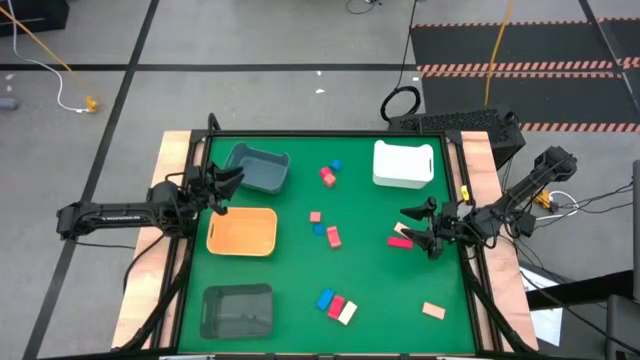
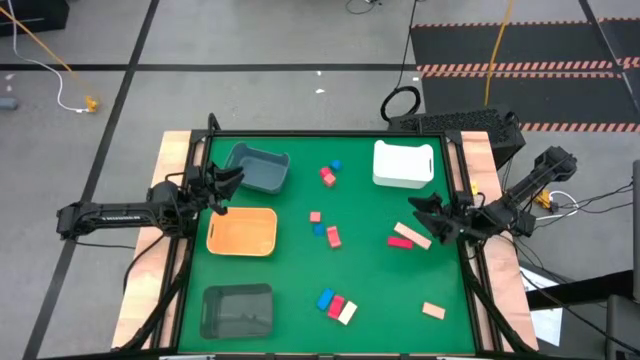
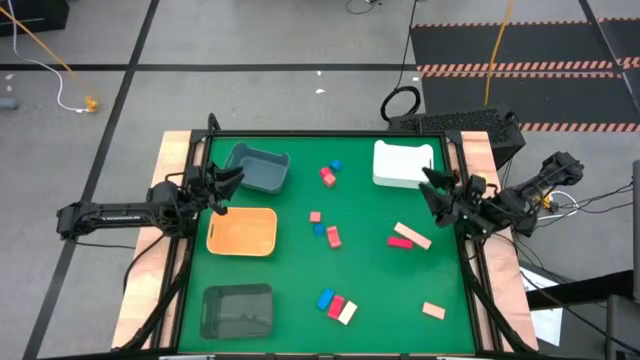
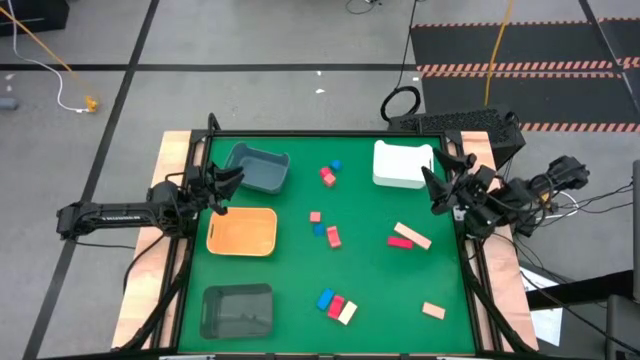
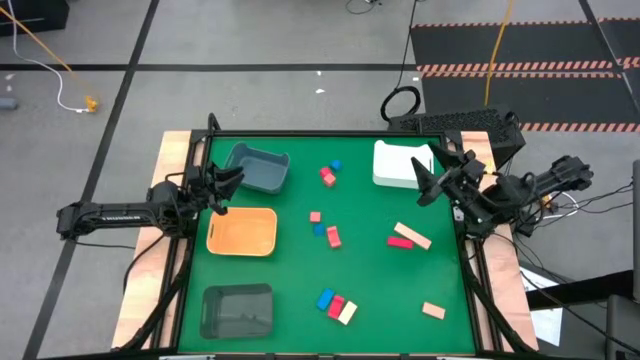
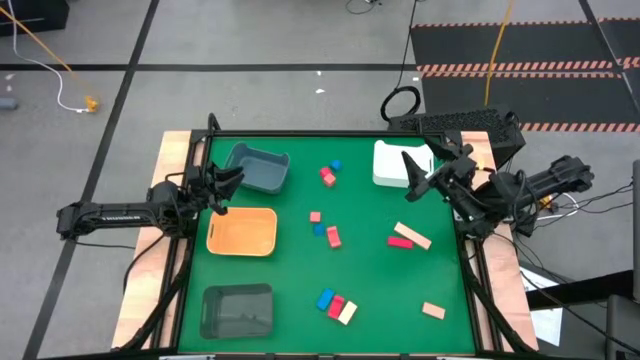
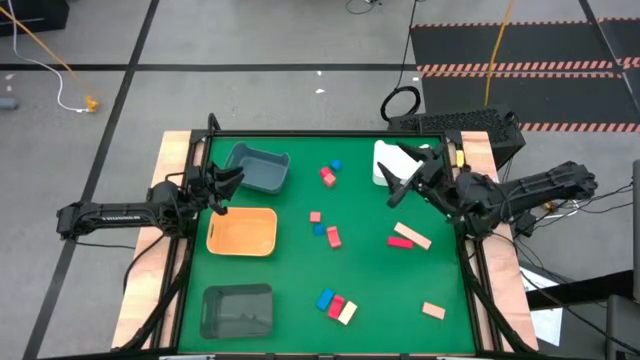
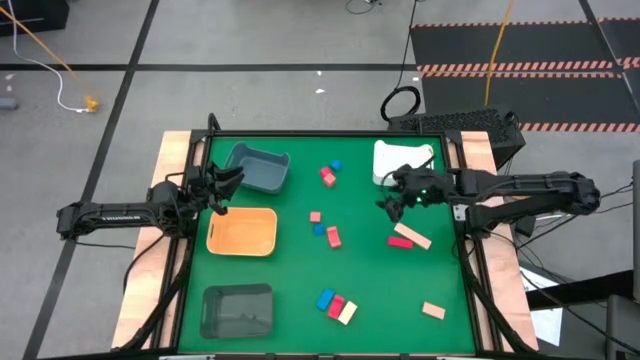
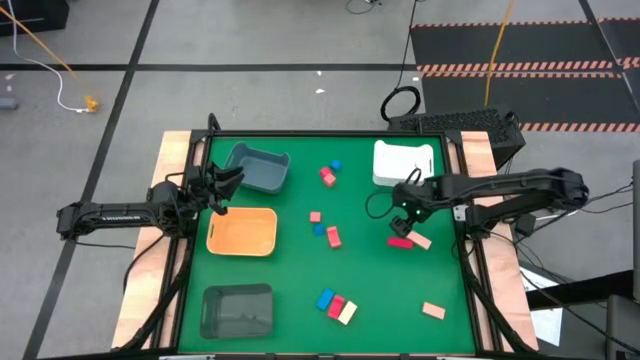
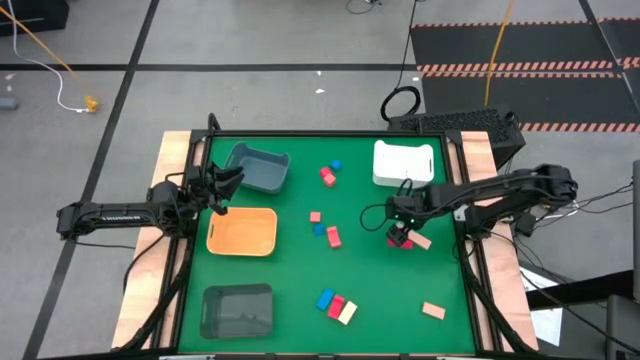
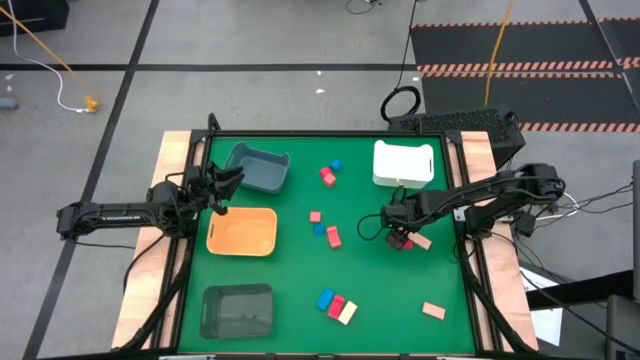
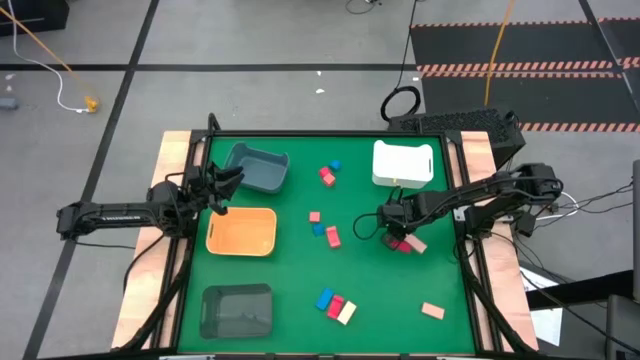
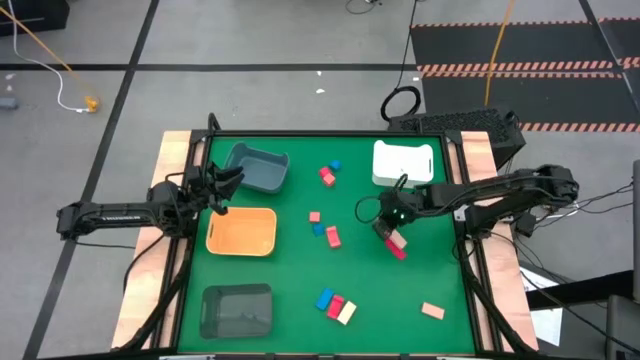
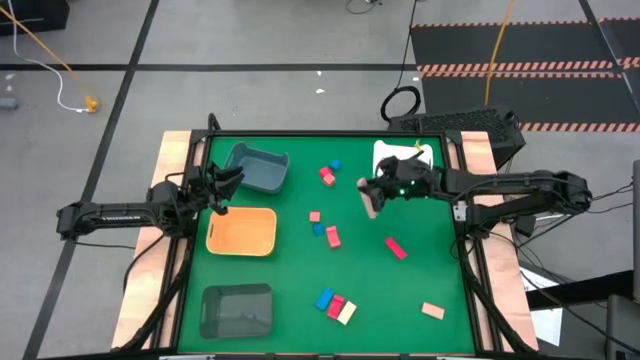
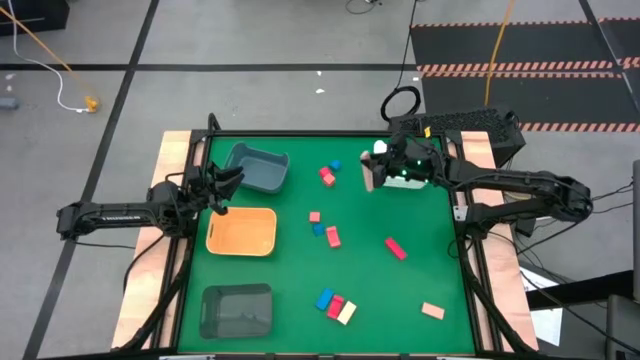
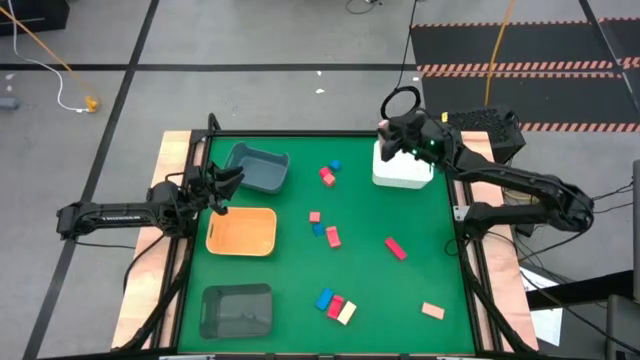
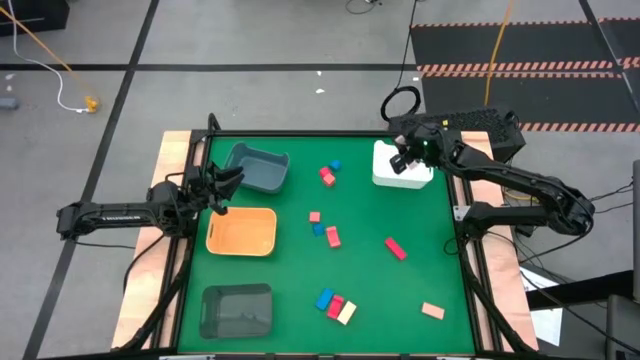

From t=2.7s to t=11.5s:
Task: Sort & place blocks by color
Put the top right brown block into the white bin

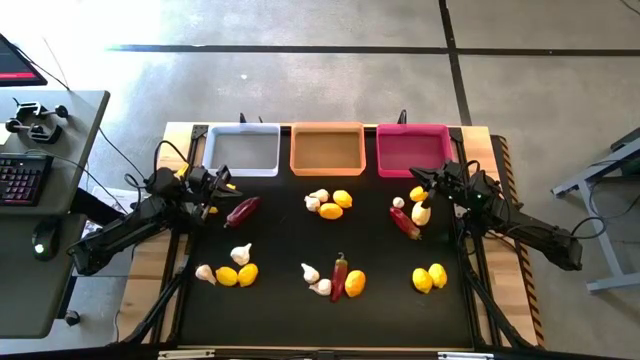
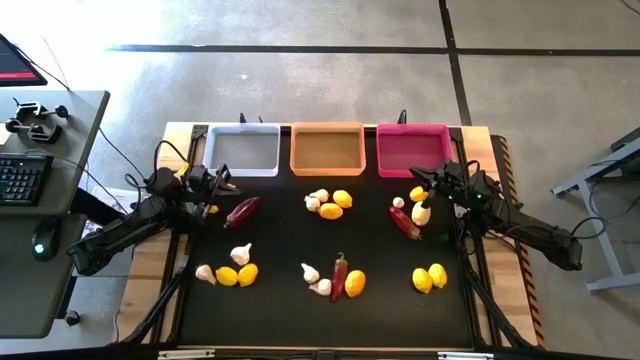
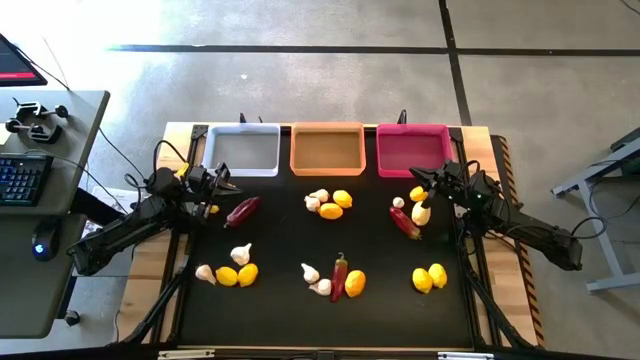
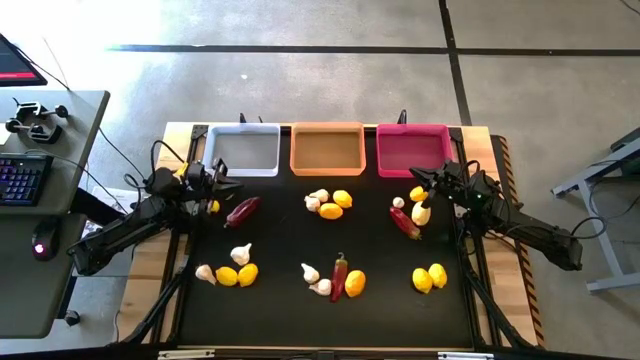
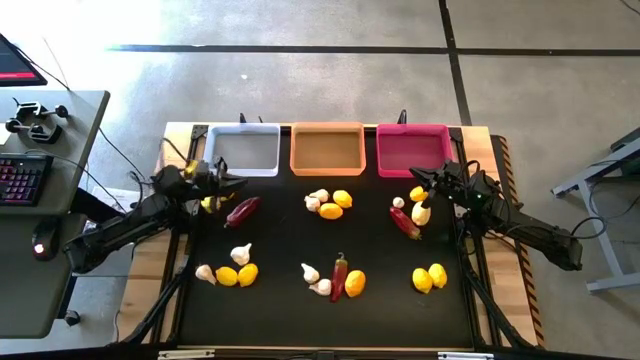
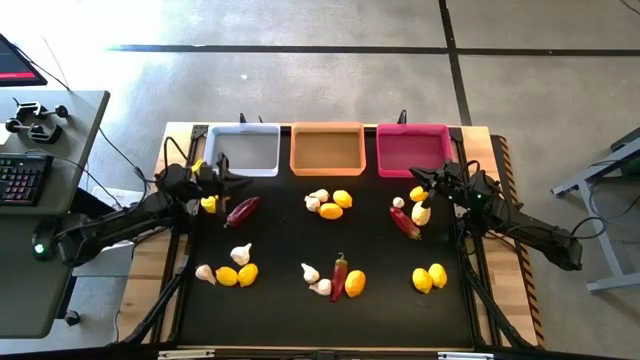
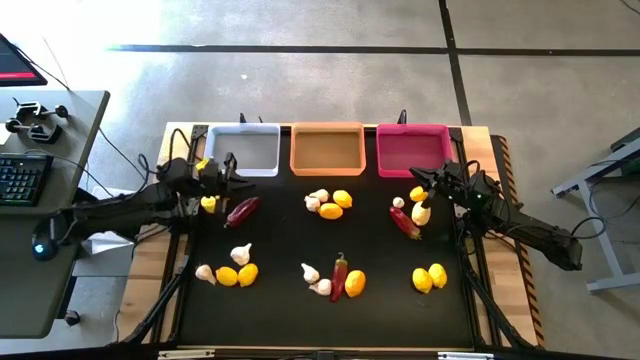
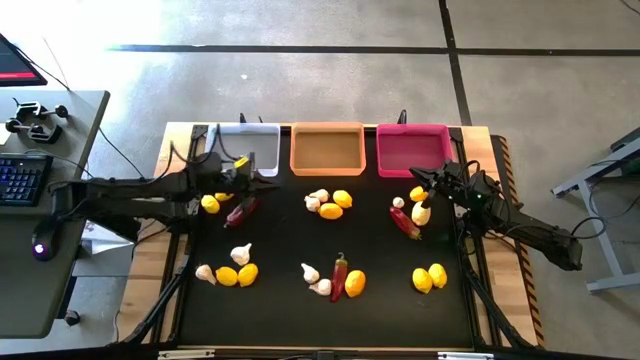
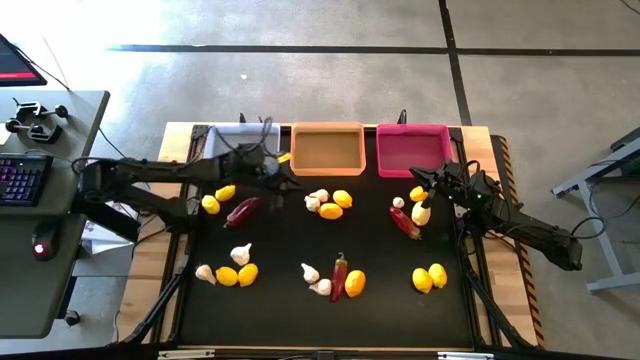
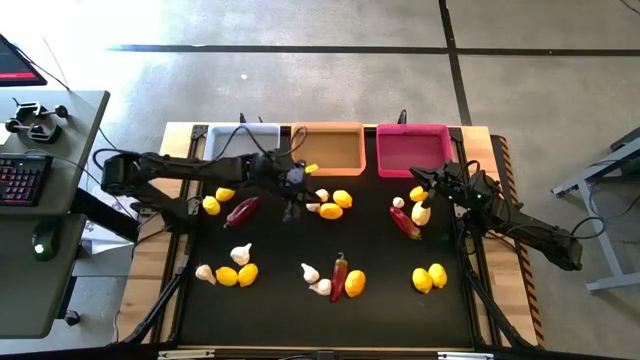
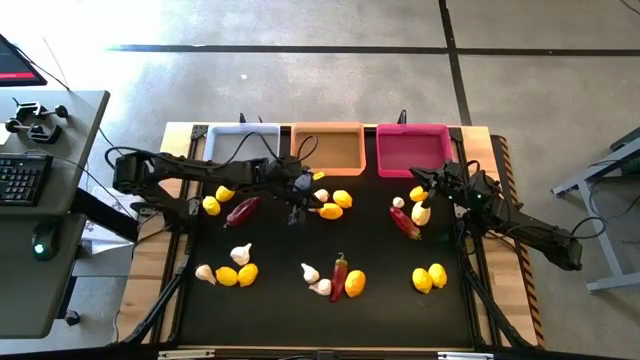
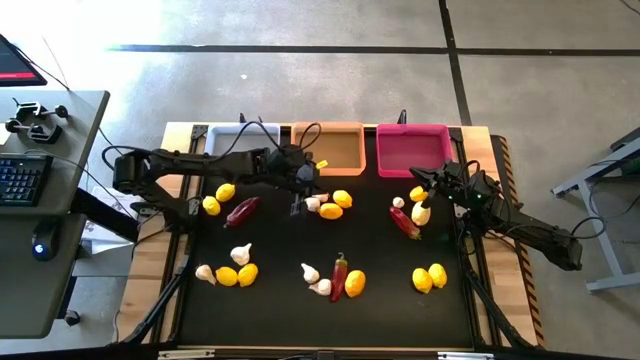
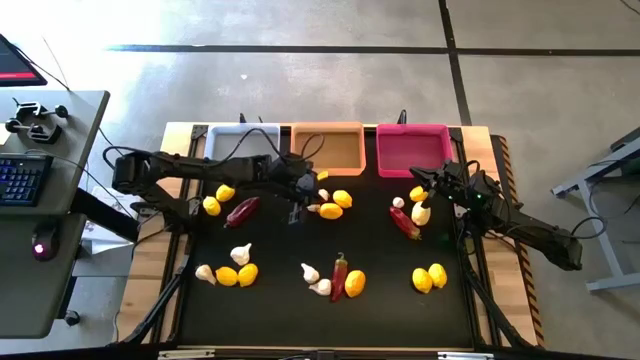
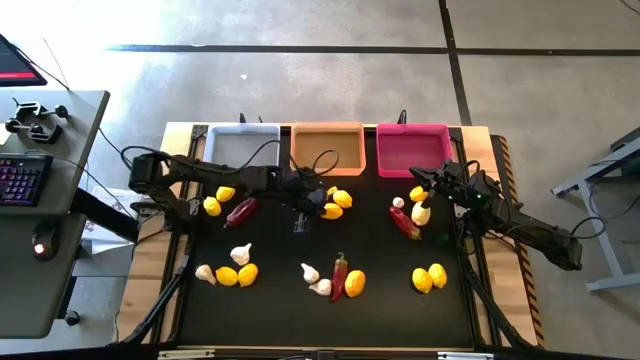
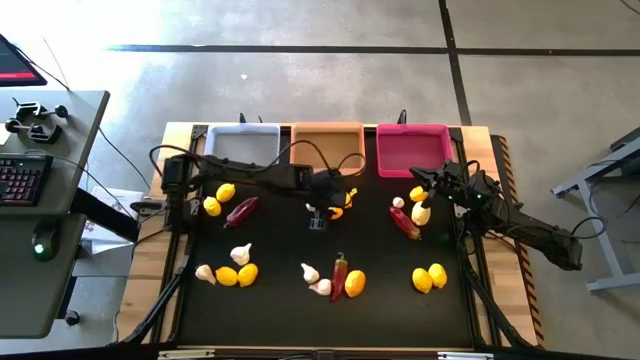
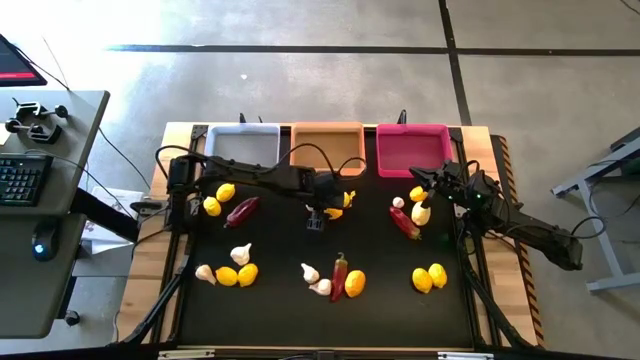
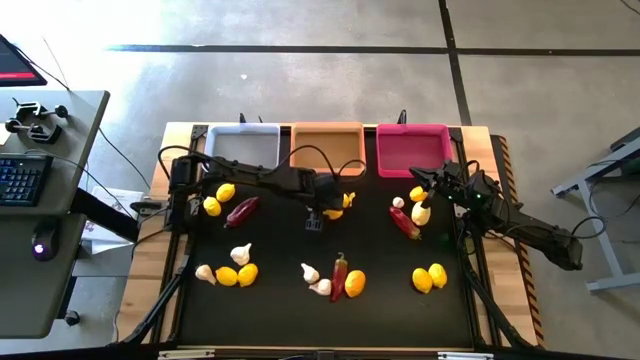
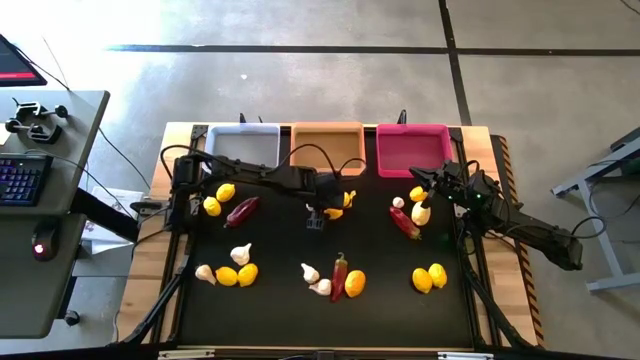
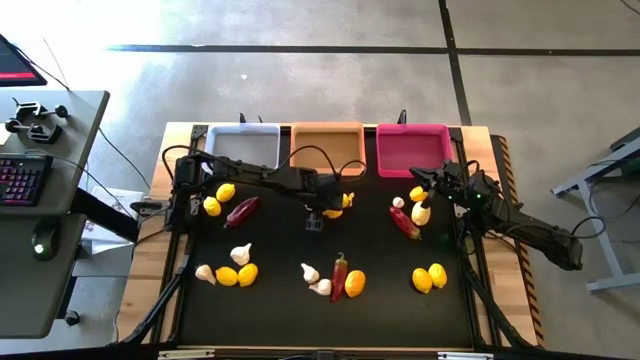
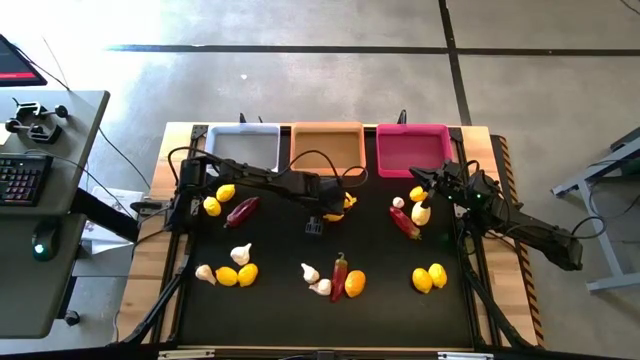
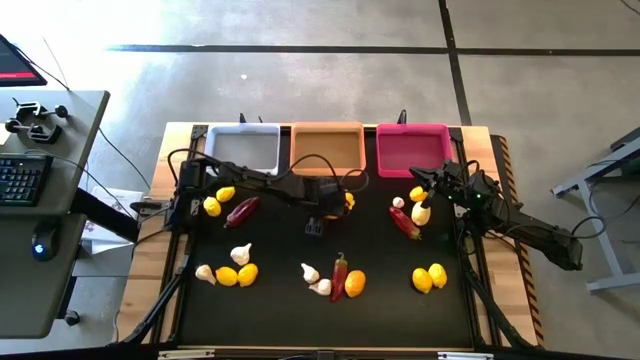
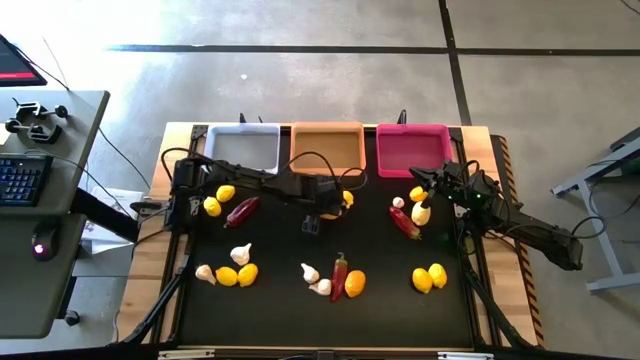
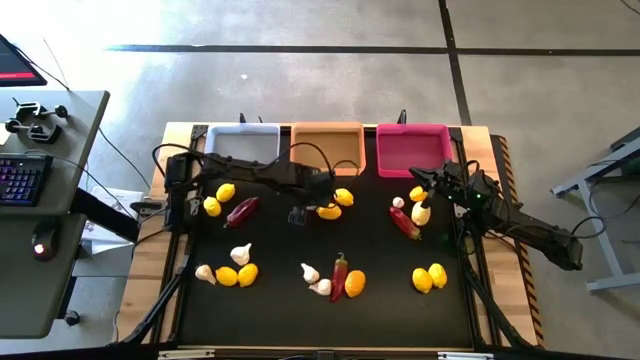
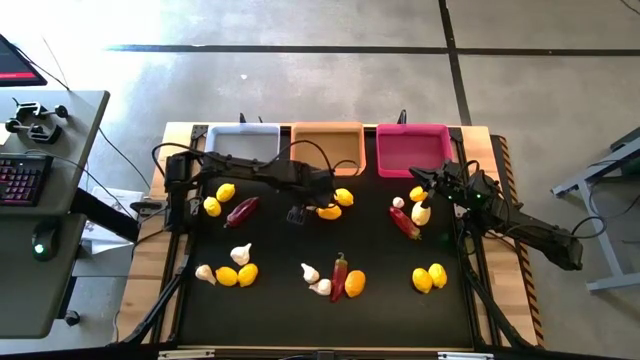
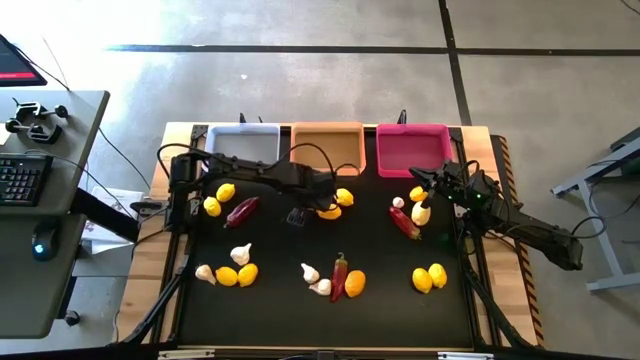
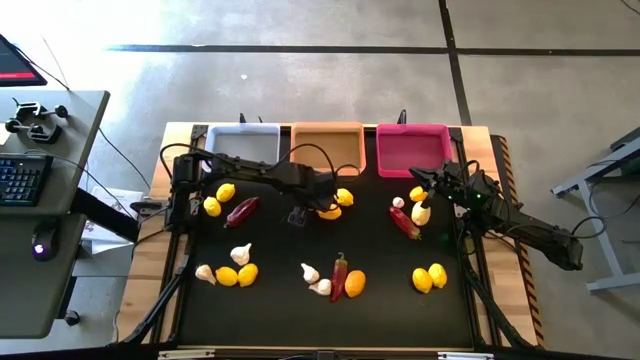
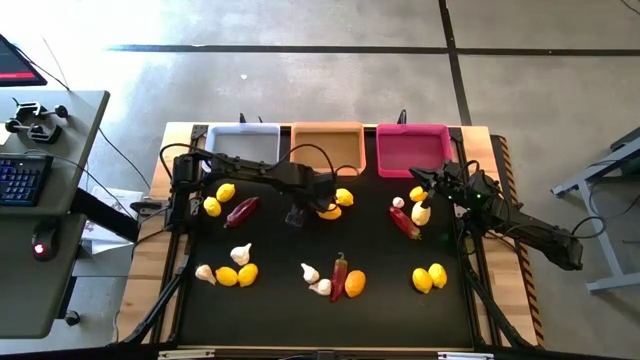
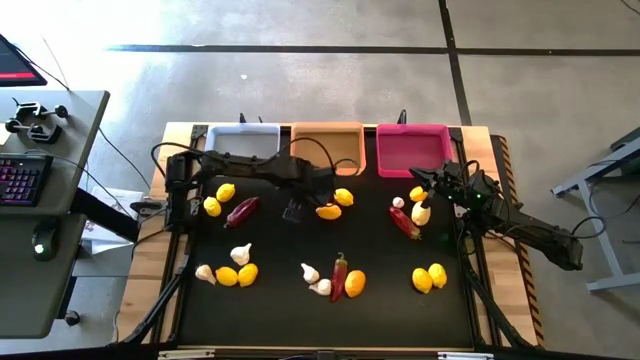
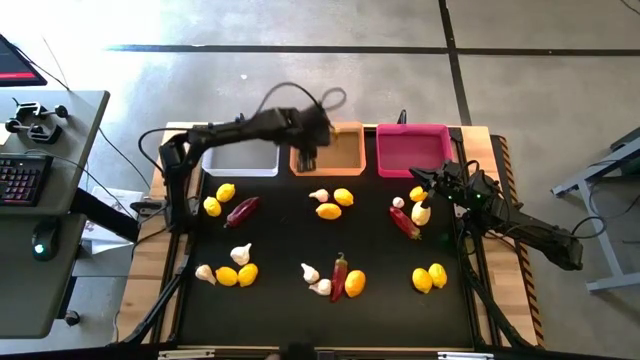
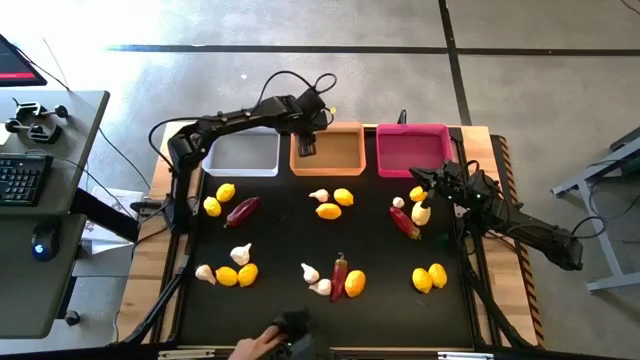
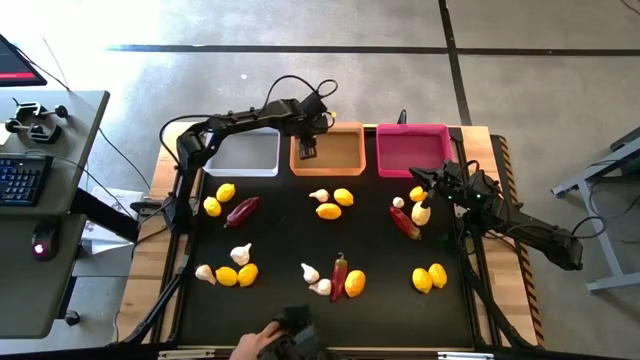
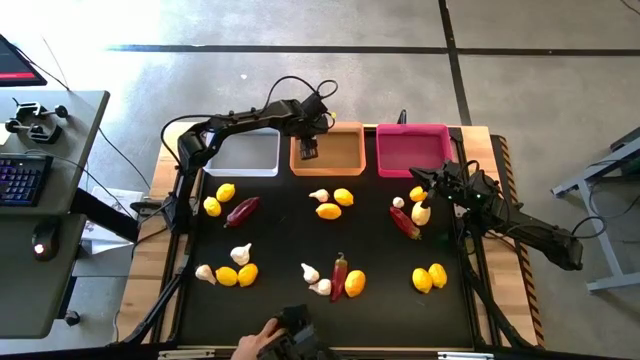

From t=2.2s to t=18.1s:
Task: Sort produce into baskets
Put the white garlic into the orange bin
